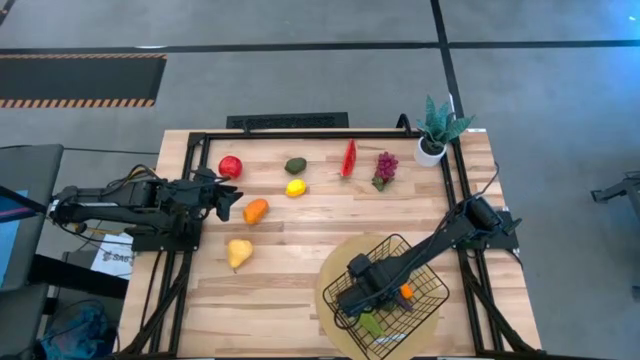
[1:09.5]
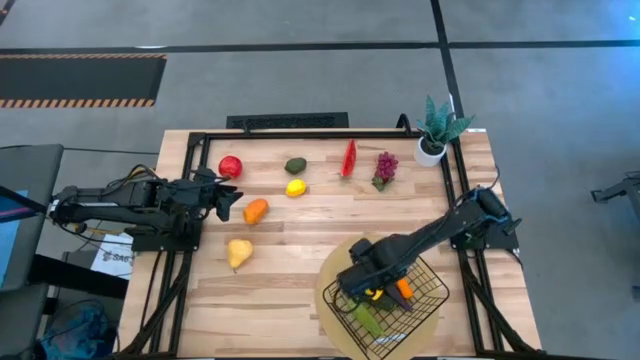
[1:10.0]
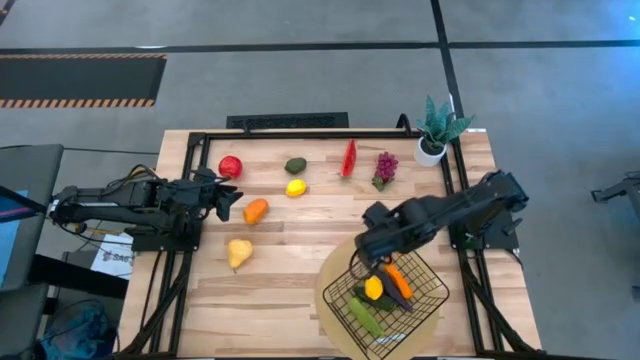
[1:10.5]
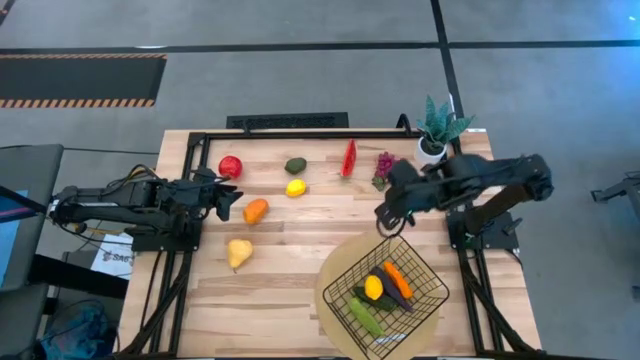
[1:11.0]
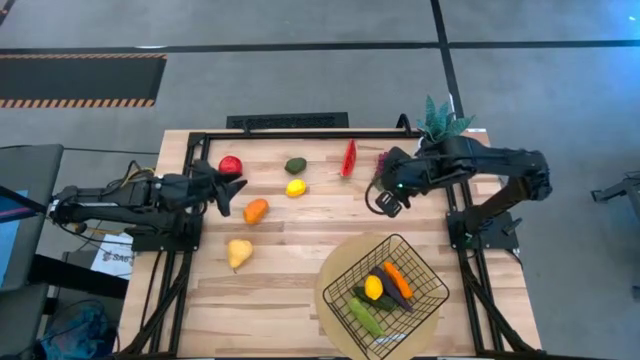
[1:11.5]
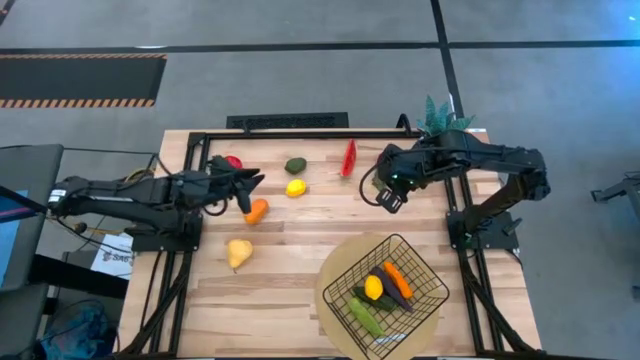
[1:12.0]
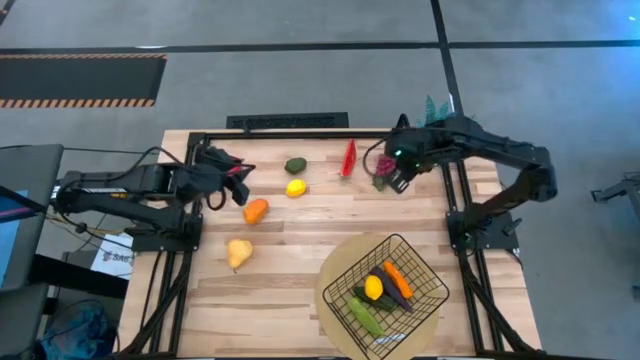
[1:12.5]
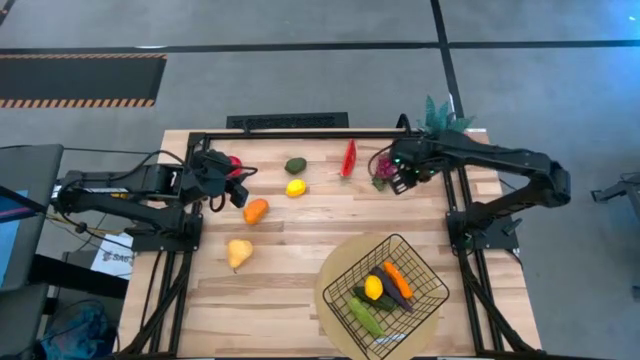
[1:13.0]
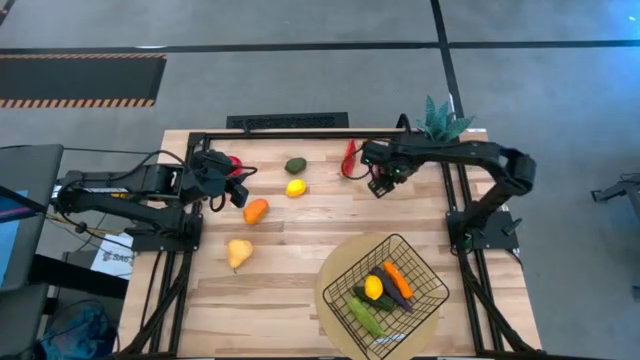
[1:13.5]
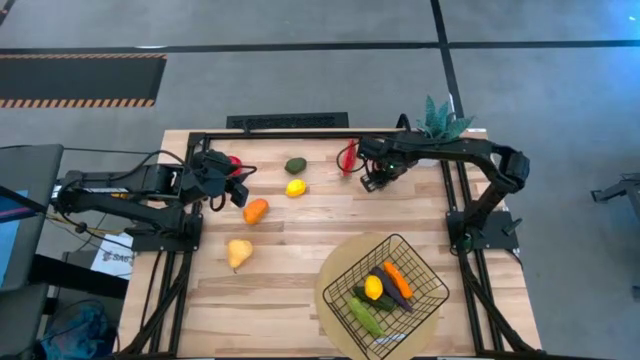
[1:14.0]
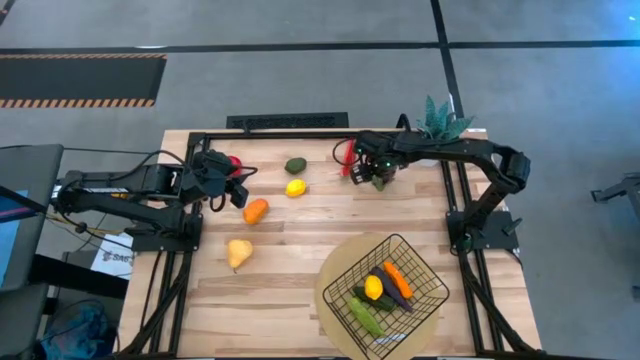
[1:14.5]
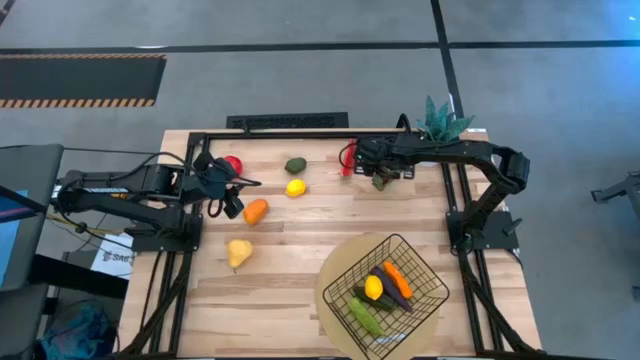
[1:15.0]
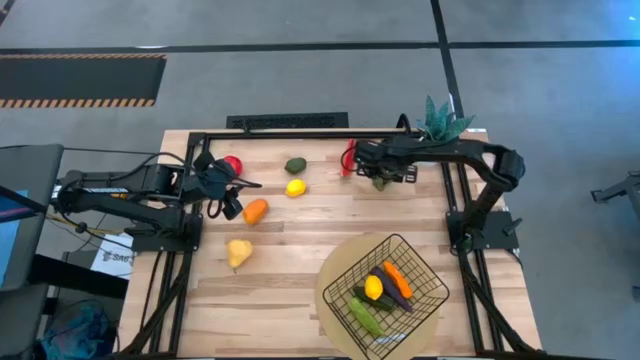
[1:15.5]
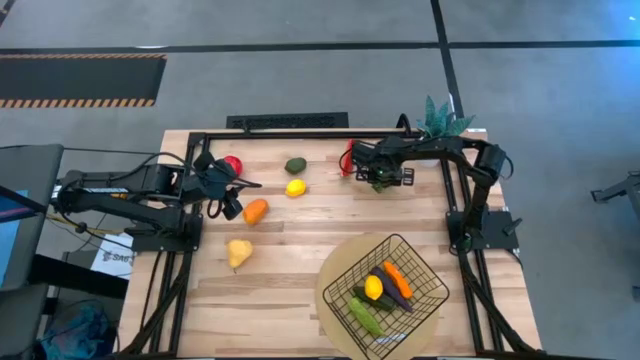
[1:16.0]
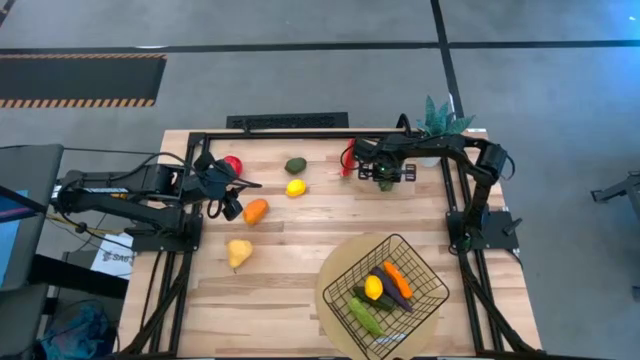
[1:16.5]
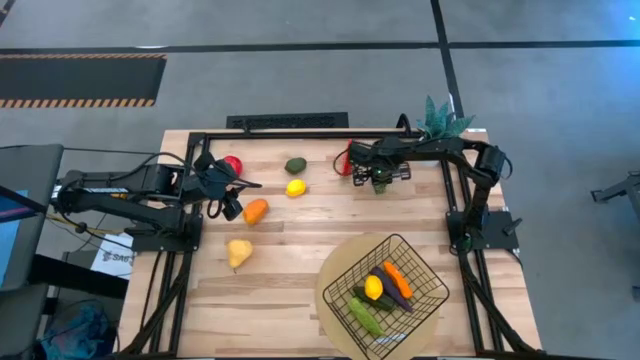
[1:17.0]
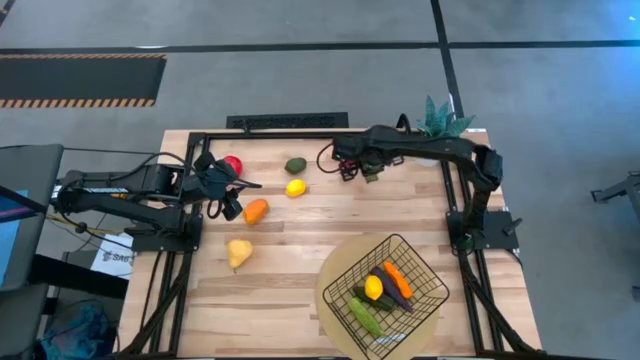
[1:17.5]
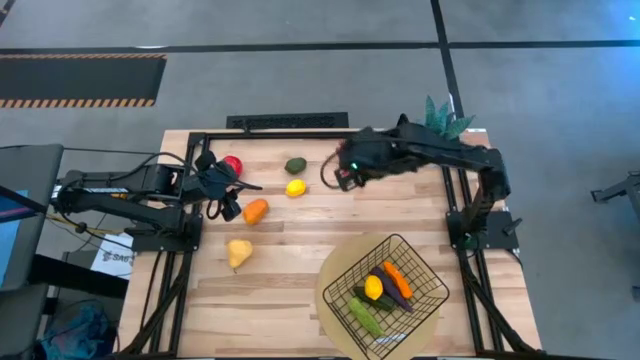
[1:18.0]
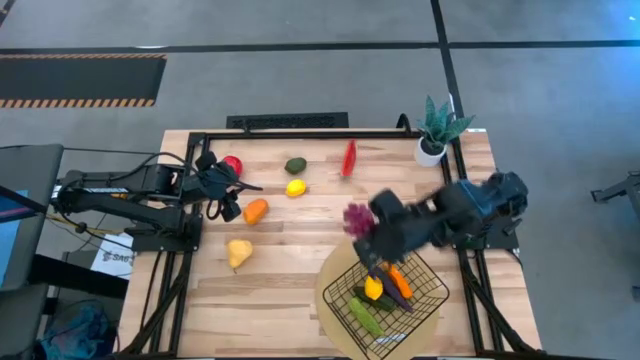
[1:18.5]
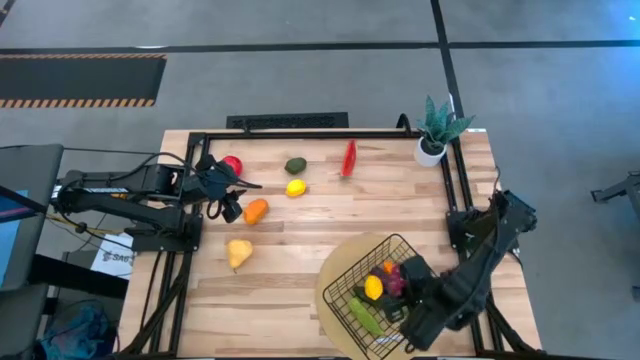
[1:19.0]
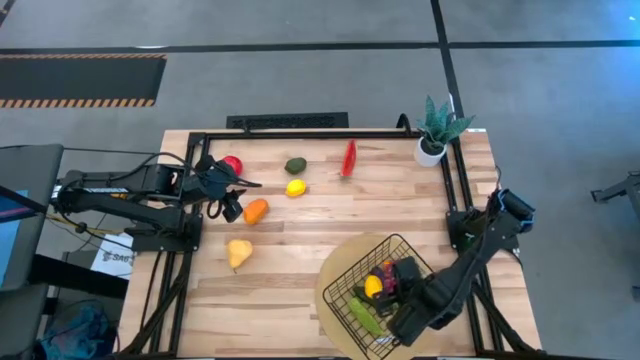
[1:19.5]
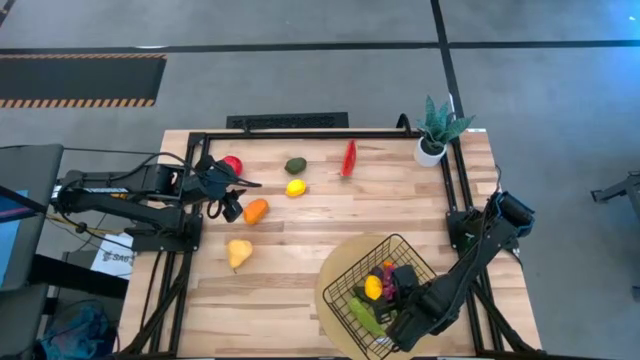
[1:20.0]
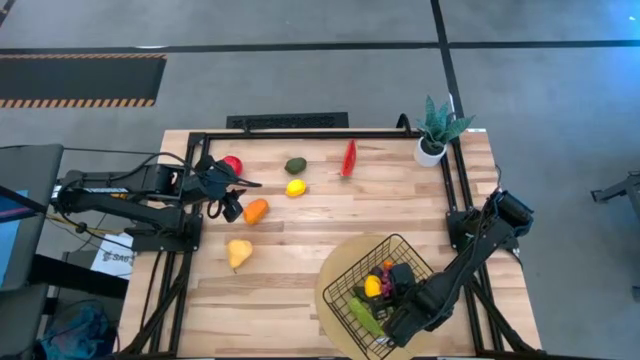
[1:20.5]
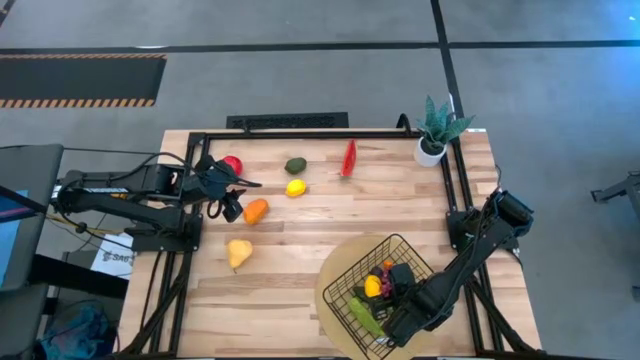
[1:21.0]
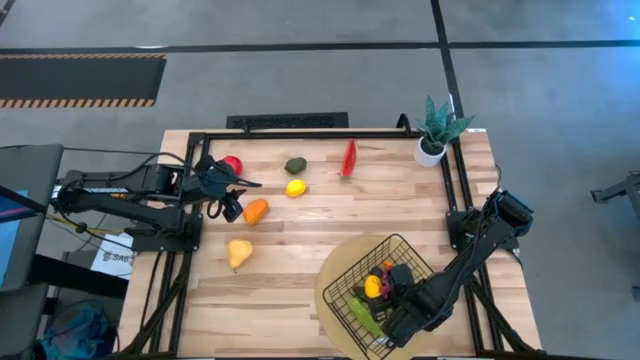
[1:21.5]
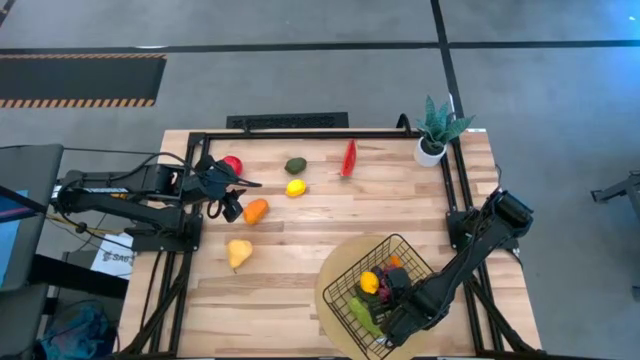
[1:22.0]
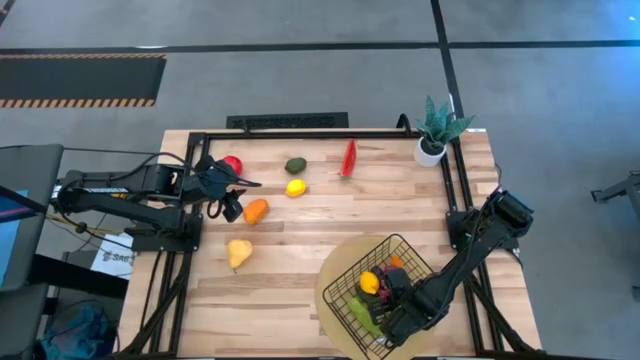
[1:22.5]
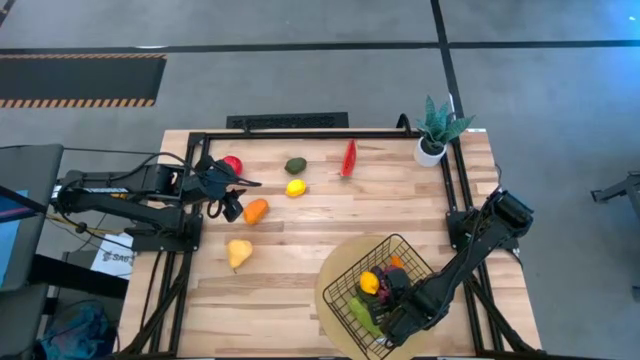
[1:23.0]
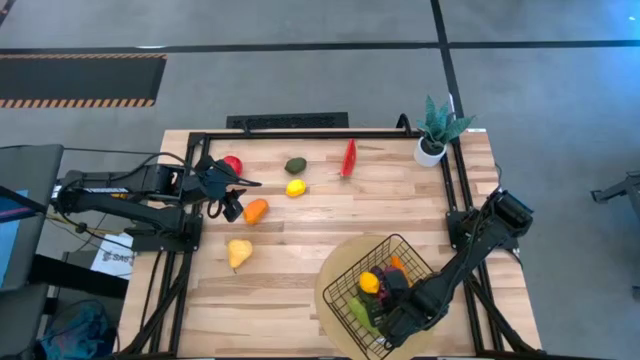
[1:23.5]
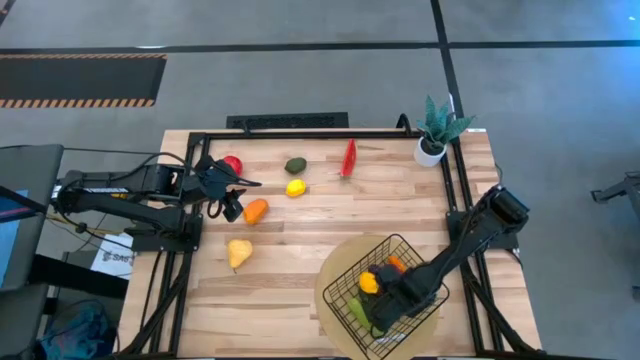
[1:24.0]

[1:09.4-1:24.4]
Task: Build produce basket
Put the grapes into the mesh basket
